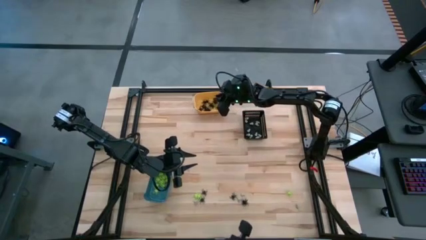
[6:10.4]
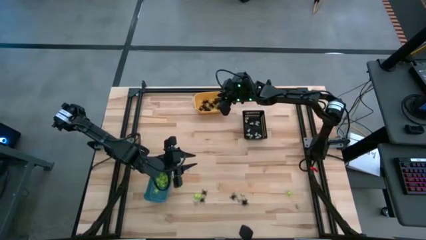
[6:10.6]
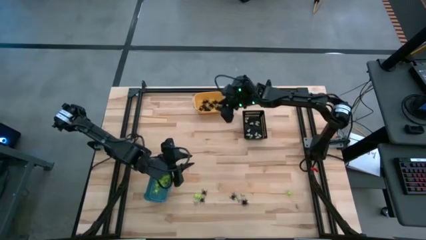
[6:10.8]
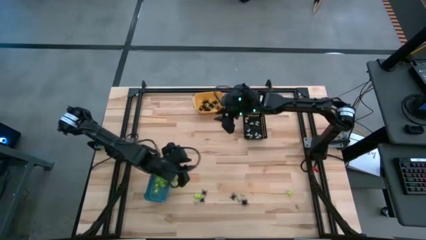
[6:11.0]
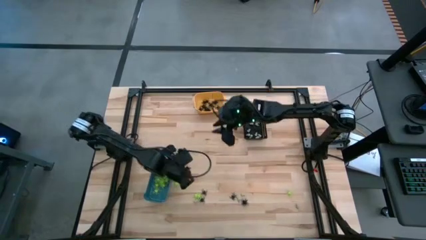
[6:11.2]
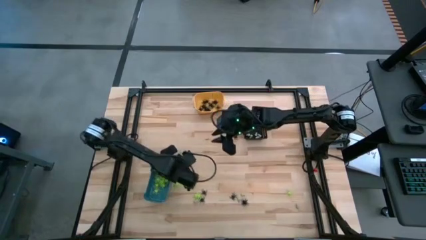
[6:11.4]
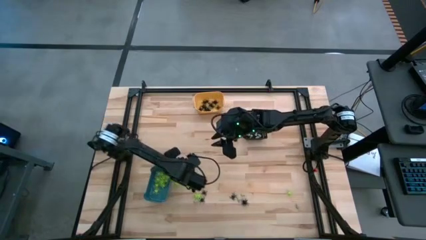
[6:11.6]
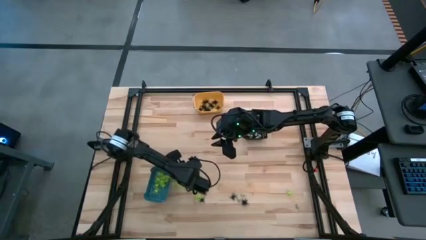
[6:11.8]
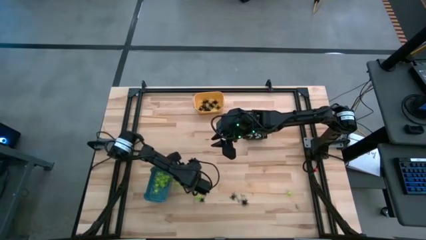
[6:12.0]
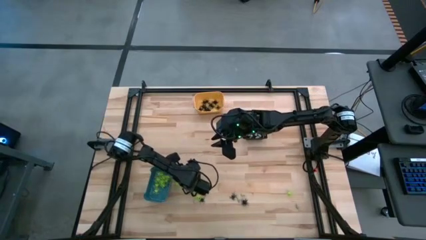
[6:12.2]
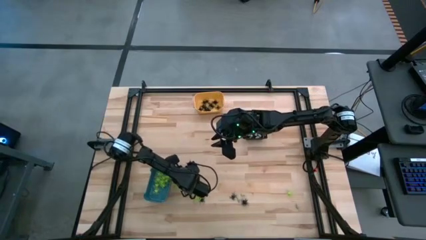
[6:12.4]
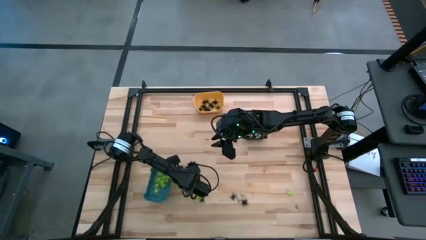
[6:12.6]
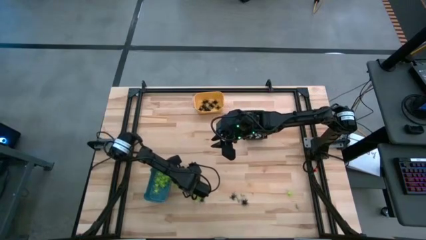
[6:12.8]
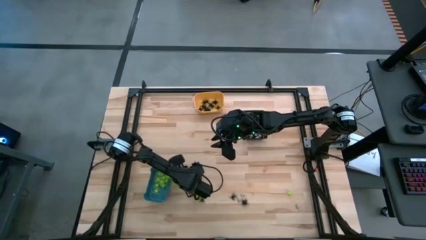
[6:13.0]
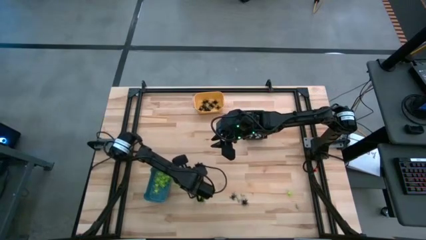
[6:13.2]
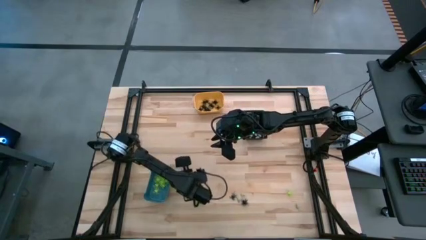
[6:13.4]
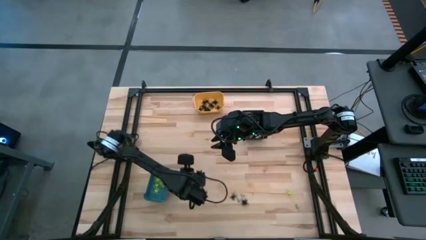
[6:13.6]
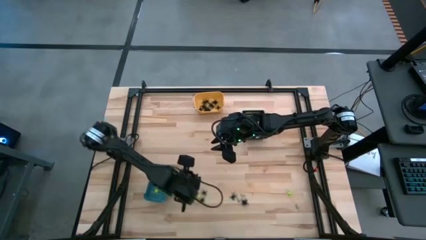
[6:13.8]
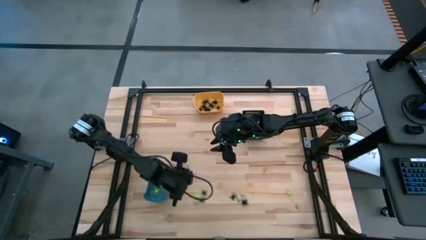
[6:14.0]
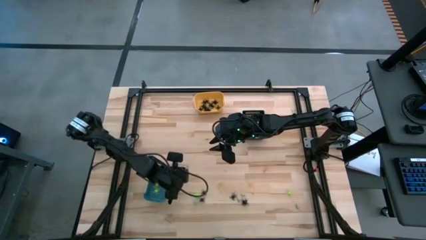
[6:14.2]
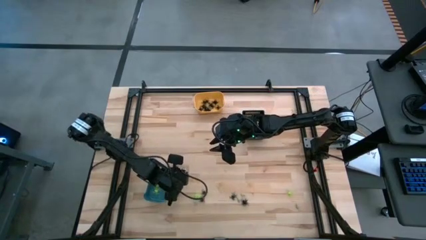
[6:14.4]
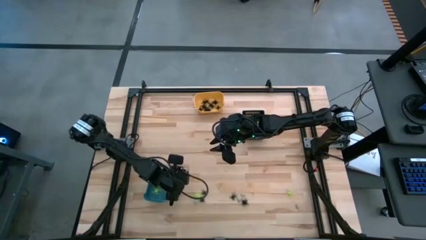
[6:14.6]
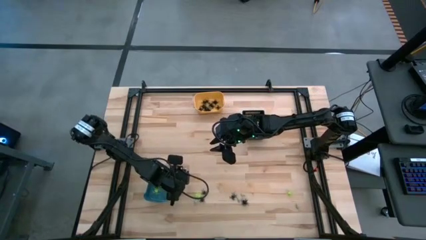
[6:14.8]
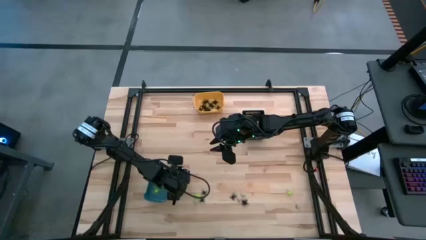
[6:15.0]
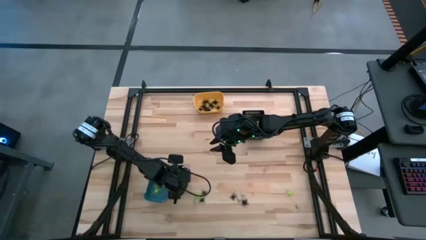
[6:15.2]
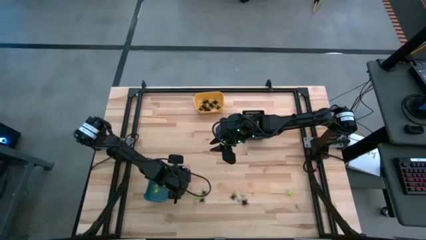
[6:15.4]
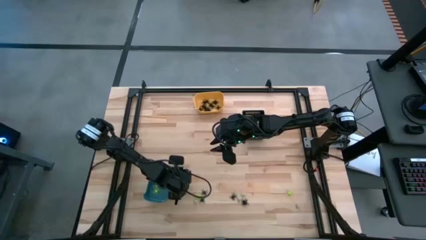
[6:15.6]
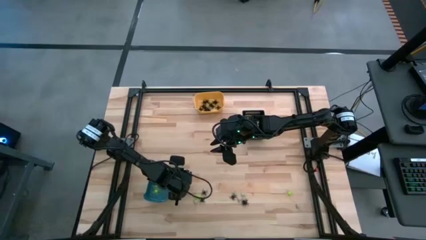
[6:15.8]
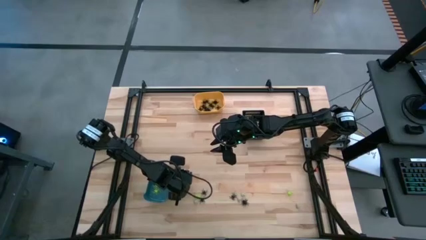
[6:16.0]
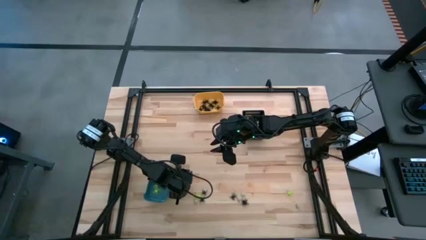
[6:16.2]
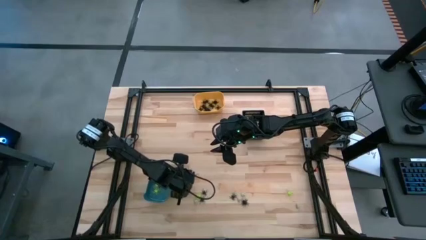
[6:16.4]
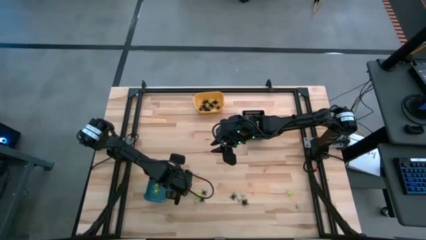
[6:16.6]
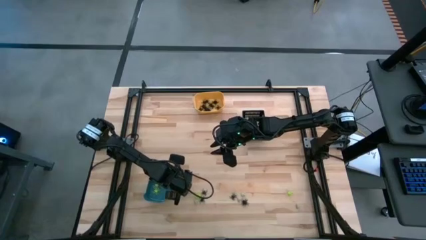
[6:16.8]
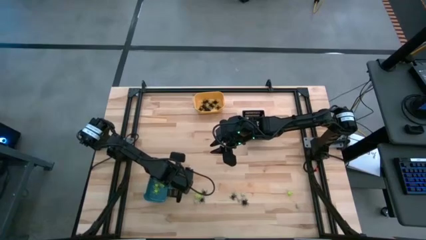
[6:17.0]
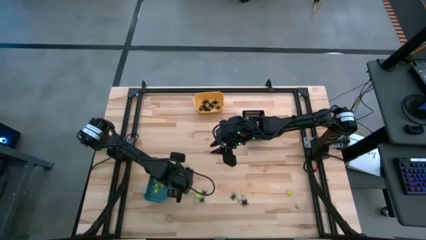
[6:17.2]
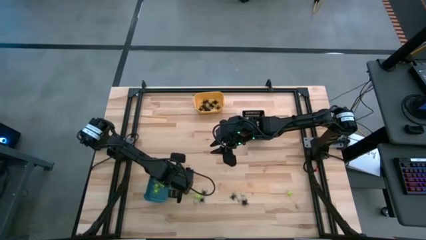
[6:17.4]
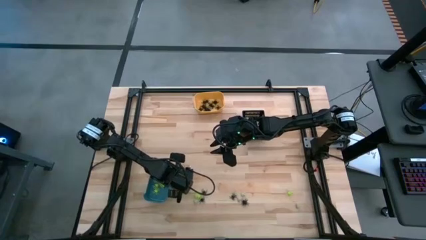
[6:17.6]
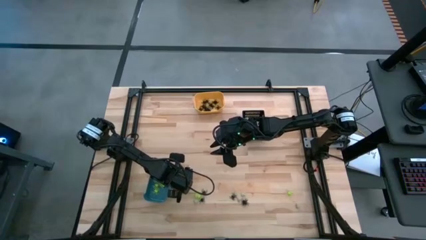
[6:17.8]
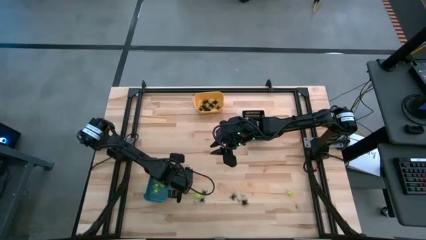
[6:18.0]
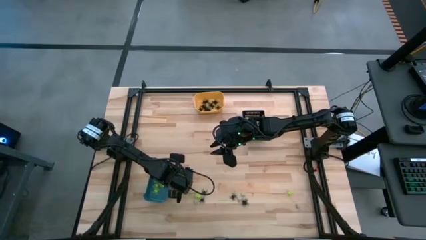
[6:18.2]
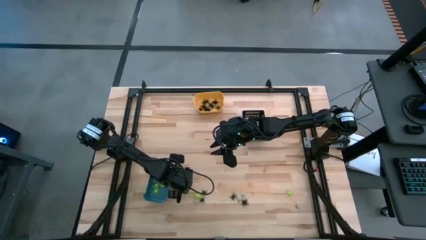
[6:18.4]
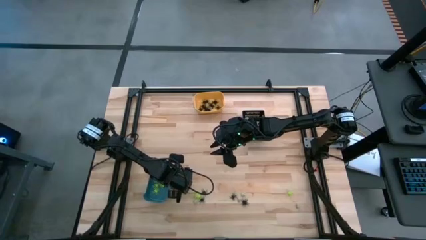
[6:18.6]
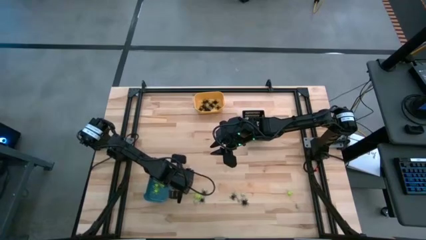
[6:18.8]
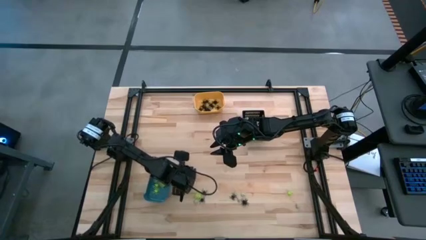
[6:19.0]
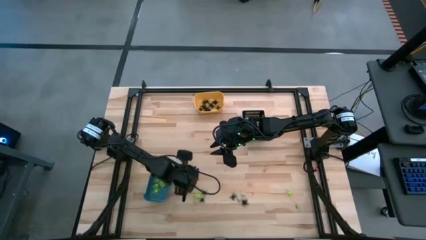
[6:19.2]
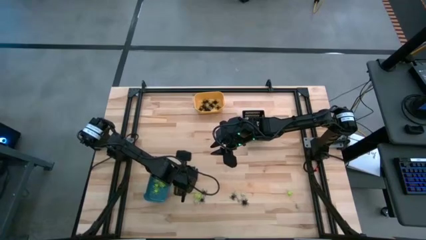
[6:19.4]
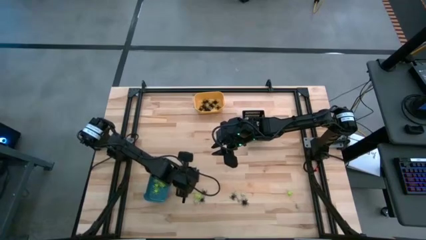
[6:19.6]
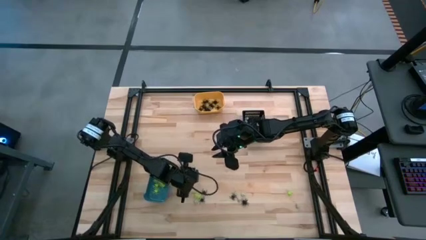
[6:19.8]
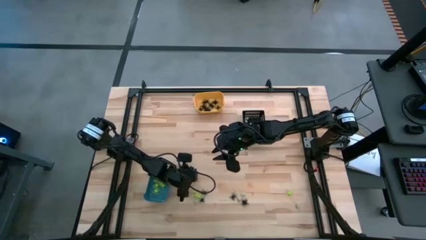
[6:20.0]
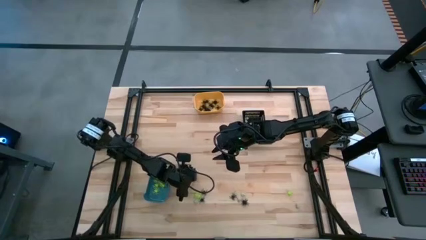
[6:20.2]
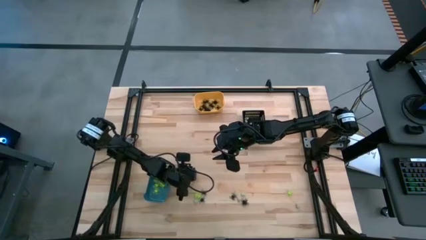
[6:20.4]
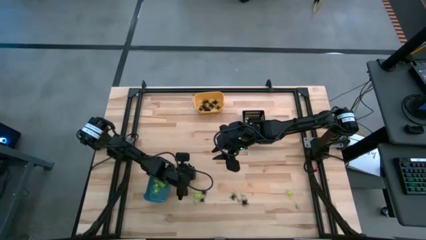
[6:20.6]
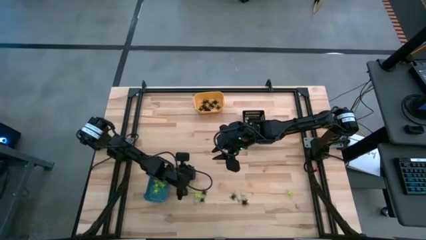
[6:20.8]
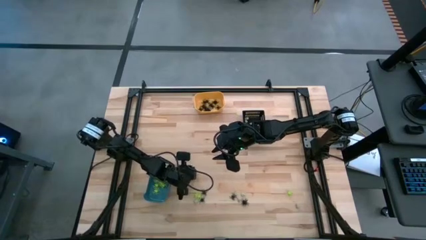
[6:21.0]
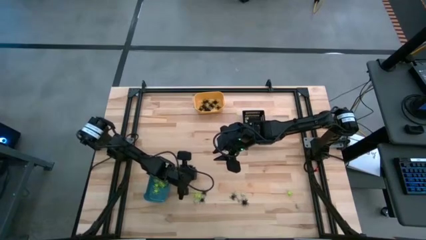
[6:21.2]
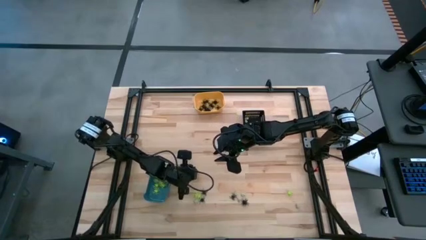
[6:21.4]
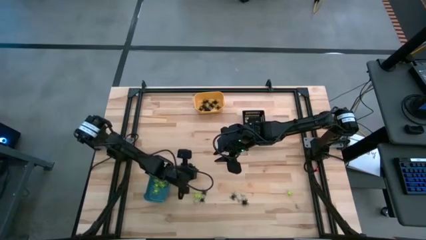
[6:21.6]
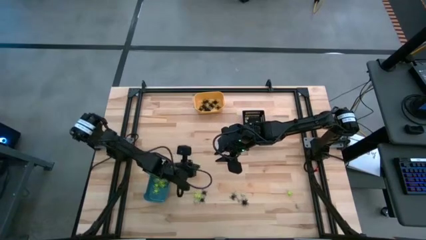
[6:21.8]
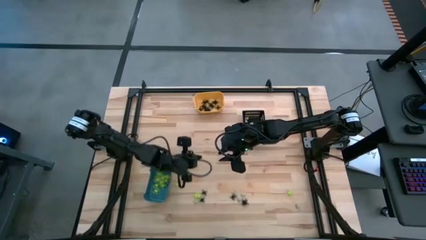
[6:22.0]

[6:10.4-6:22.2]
Task: Sort Halloween decoration
Put the green spider toy into the blue bin

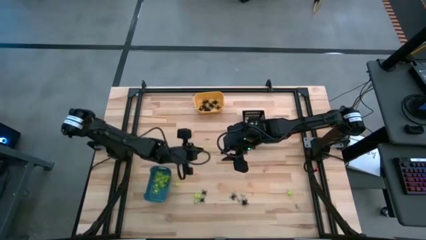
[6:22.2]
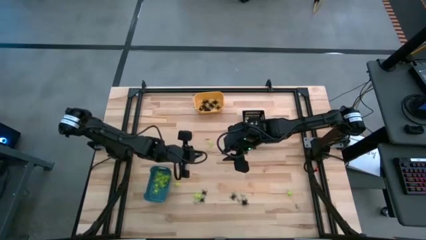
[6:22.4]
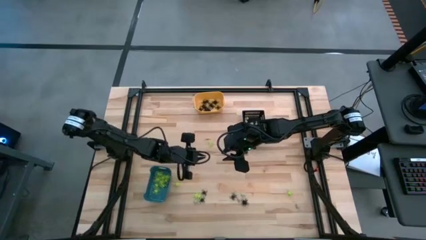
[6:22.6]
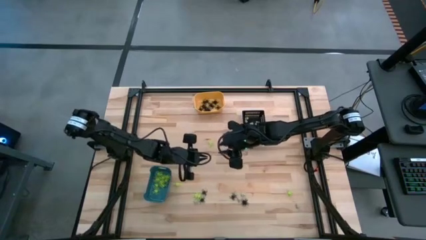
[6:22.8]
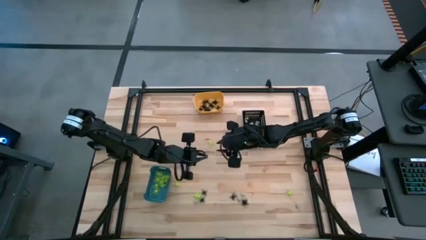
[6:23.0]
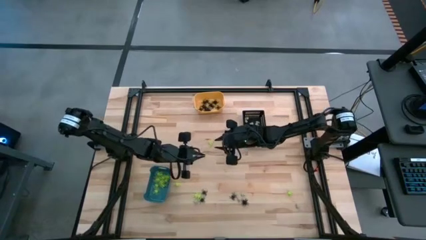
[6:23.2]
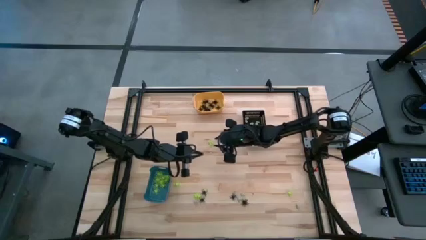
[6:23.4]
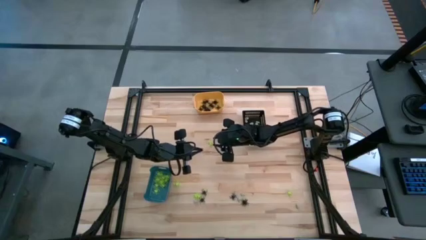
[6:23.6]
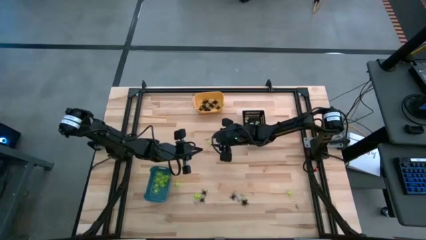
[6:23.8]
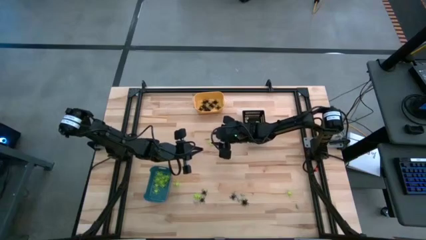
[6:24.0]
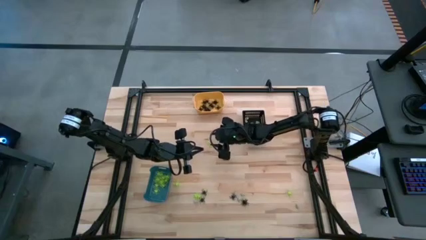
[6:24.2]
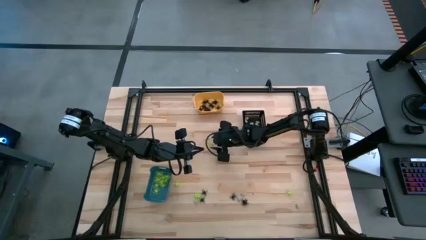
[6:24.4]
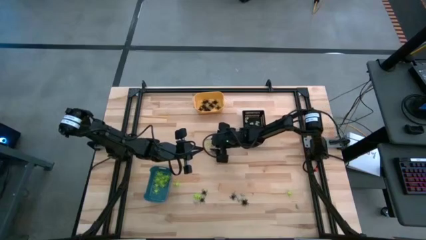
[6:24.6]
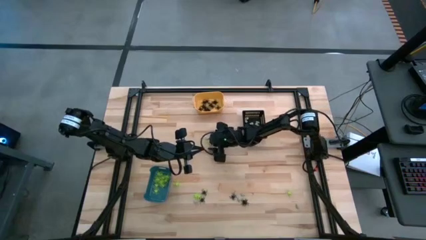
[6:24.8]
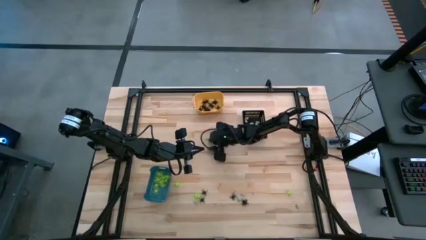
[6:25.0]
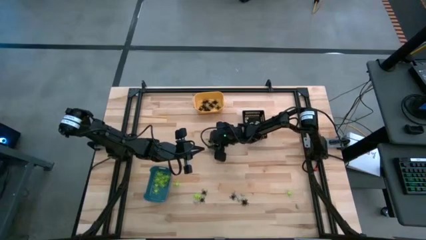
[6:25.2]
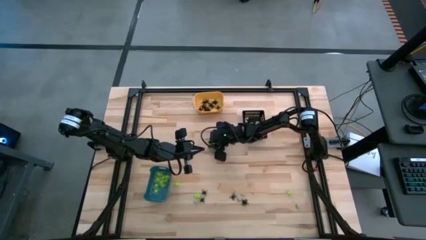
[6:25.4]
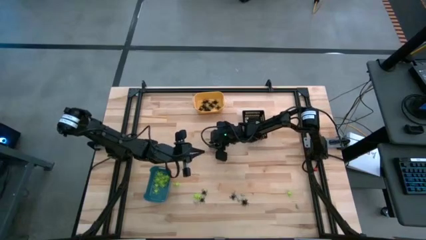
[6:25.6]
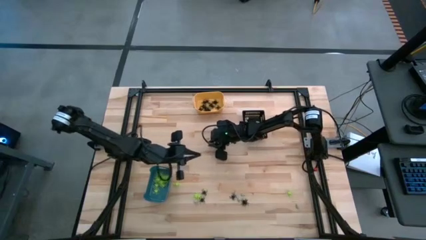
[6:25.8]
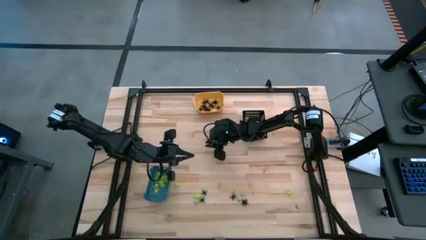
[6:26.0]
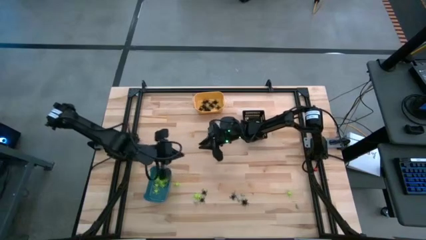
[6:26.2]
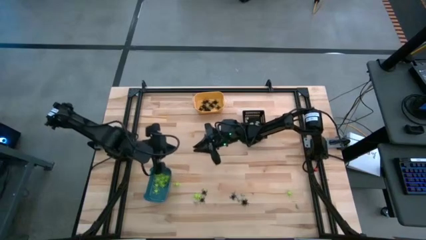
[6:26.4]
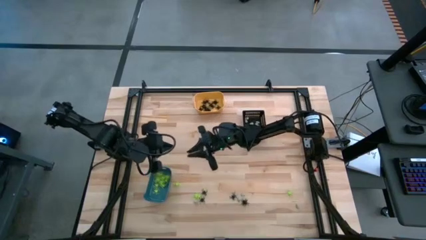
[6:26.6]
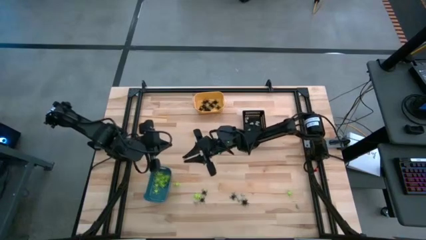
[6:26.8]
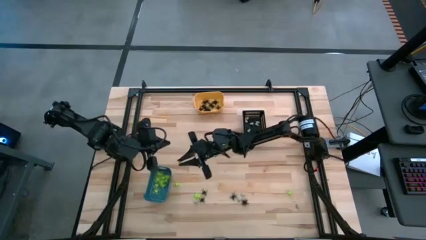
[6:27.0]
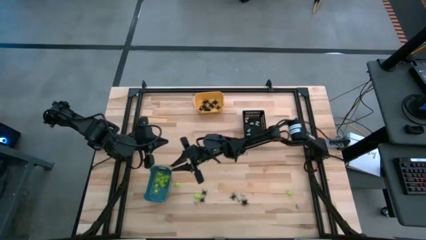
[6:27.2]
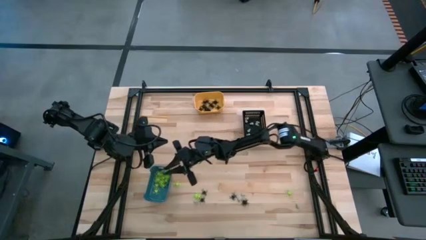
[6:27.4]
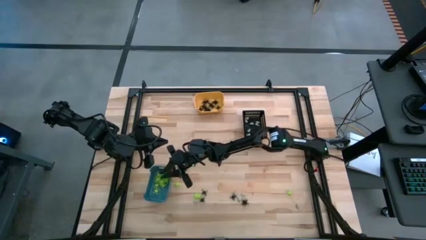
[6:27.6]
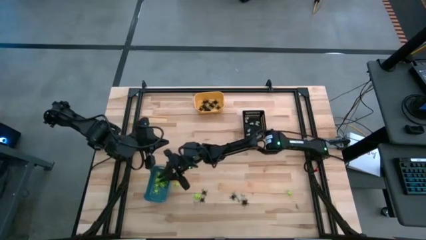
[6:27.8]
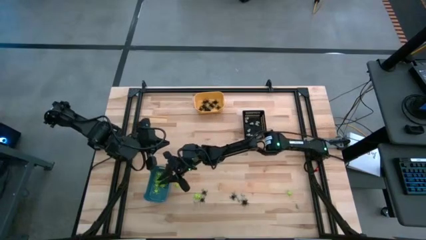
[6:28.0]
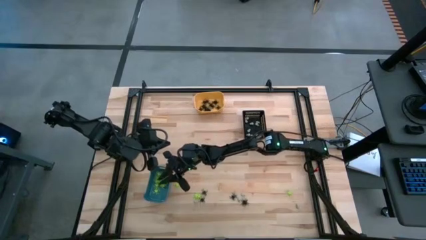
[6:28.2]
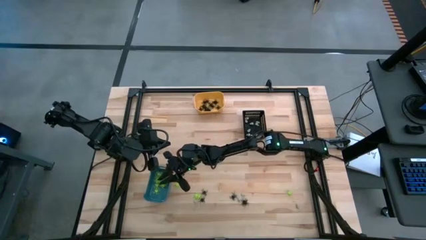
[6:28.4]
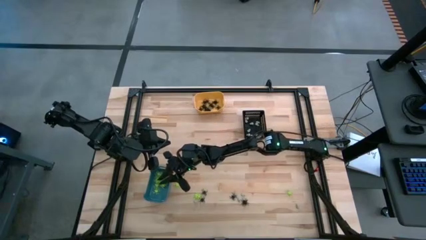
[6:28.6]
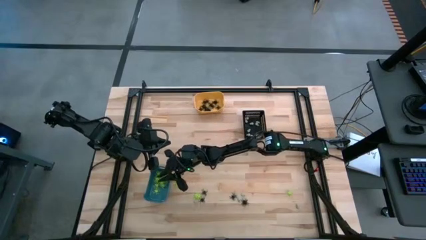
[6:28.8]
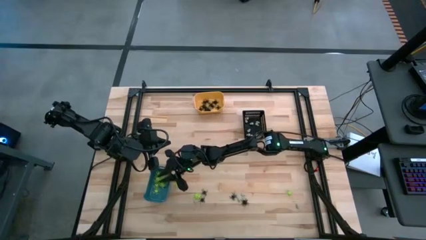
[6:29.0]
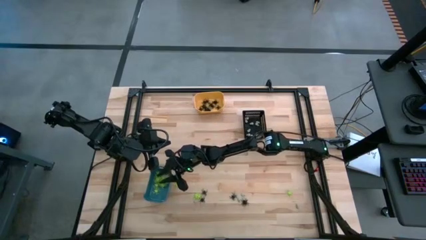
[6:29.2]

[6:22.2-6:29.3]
Put the green spider toy into the blue bin
